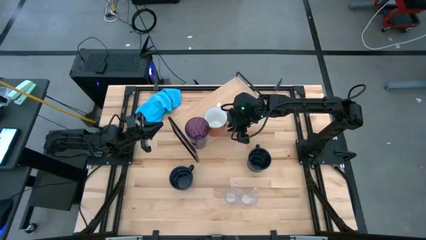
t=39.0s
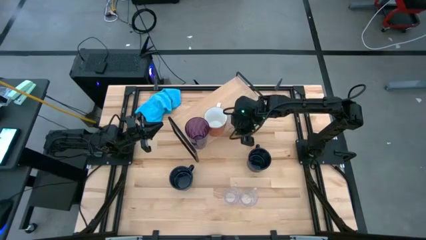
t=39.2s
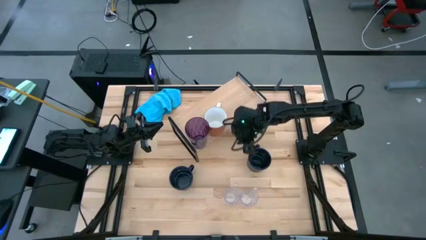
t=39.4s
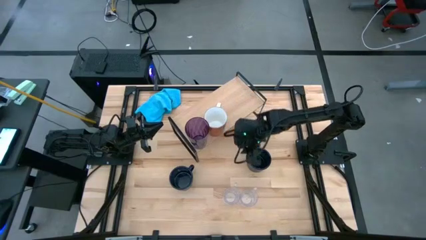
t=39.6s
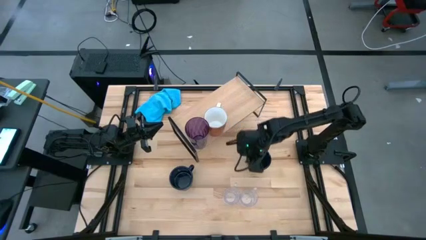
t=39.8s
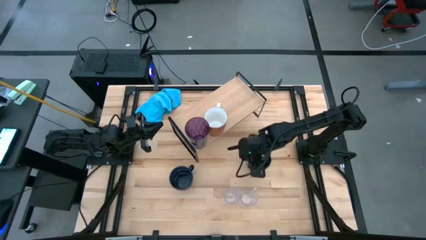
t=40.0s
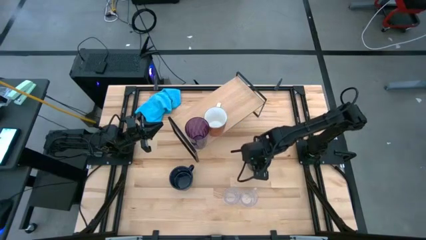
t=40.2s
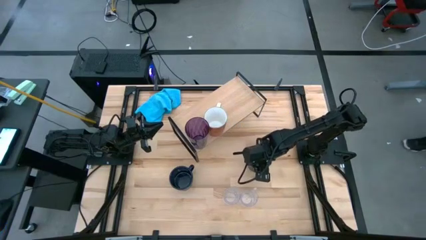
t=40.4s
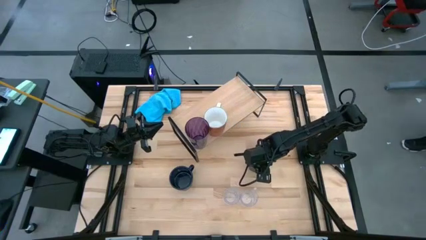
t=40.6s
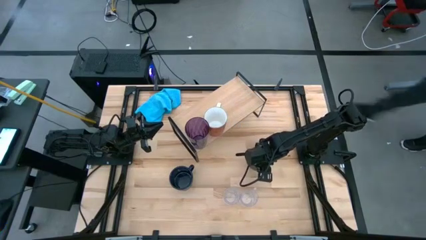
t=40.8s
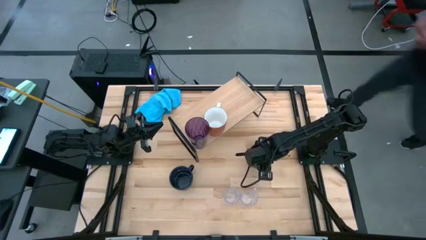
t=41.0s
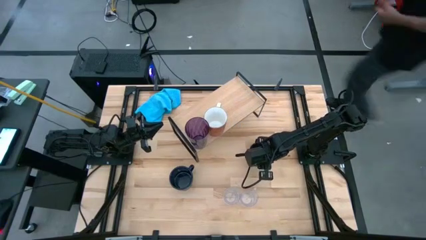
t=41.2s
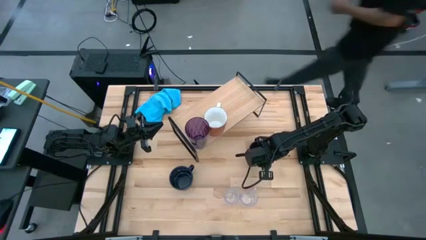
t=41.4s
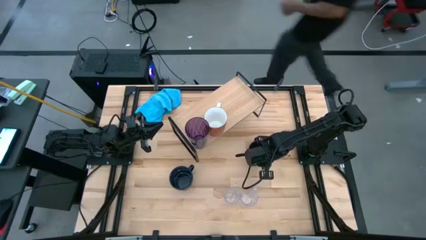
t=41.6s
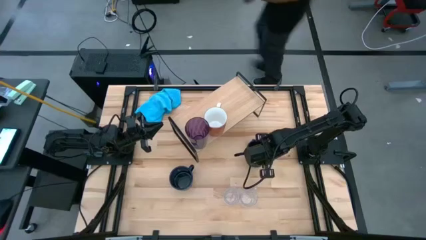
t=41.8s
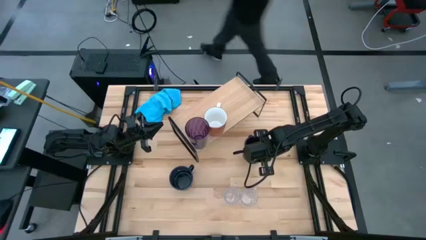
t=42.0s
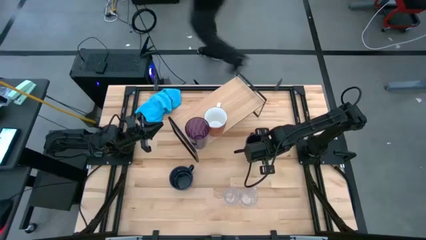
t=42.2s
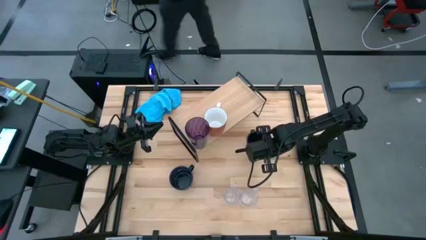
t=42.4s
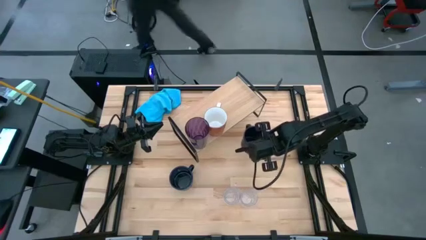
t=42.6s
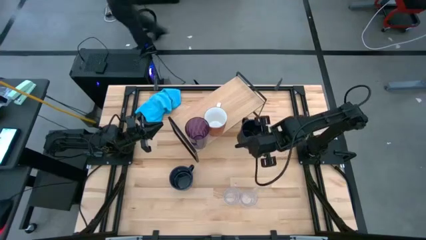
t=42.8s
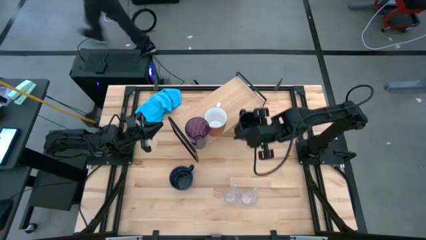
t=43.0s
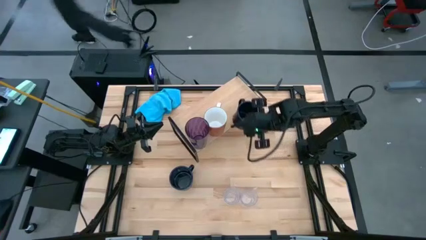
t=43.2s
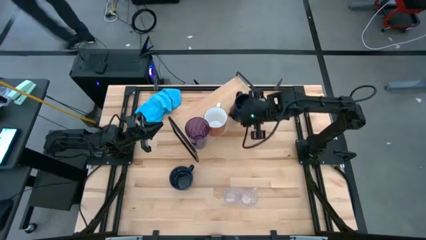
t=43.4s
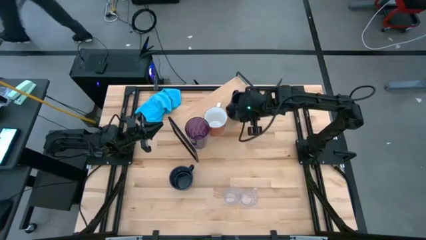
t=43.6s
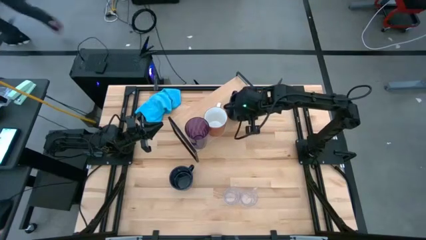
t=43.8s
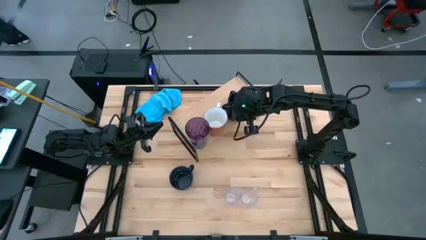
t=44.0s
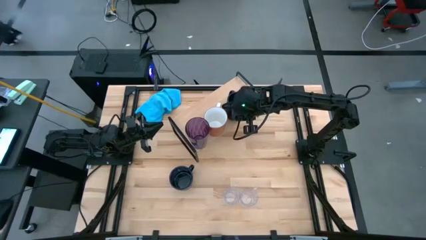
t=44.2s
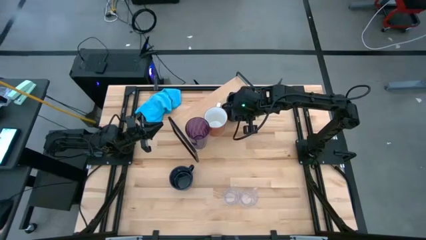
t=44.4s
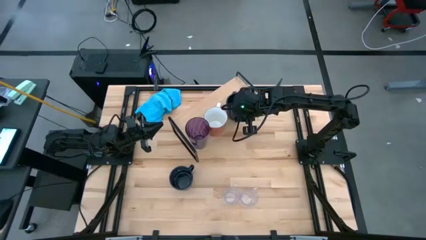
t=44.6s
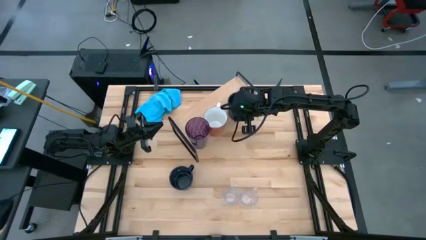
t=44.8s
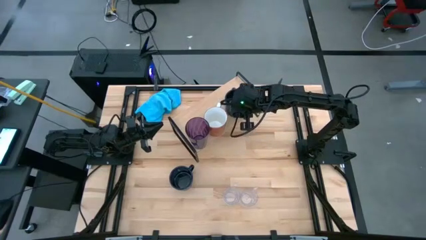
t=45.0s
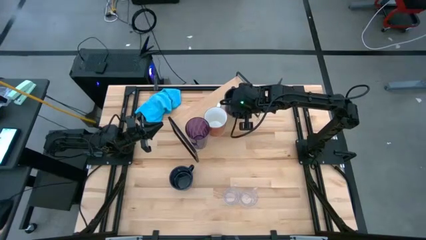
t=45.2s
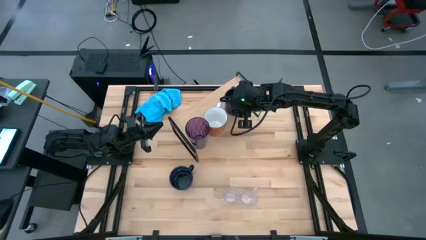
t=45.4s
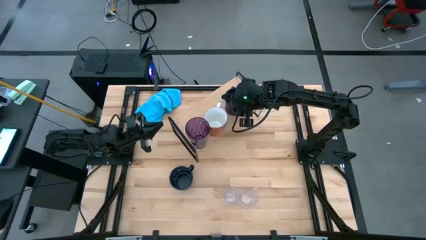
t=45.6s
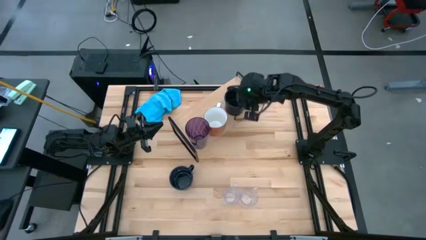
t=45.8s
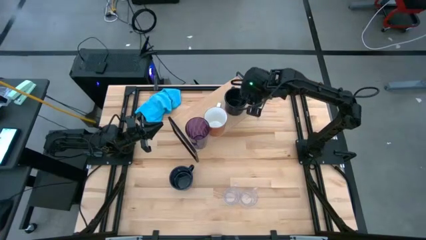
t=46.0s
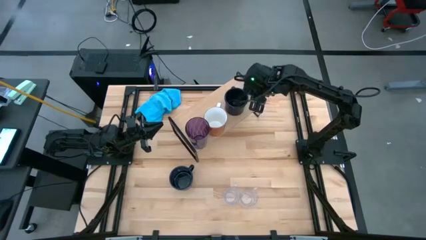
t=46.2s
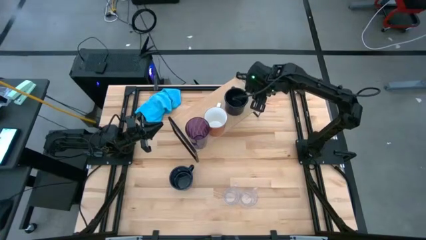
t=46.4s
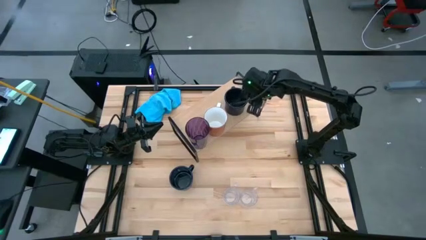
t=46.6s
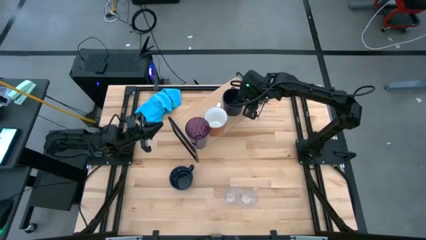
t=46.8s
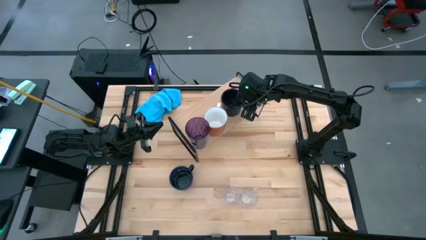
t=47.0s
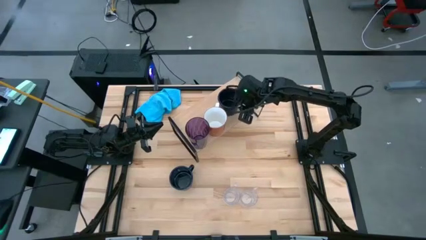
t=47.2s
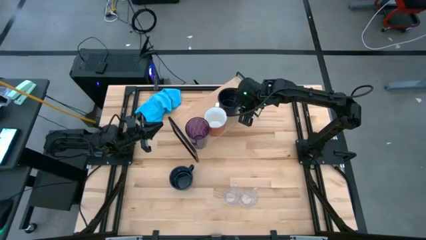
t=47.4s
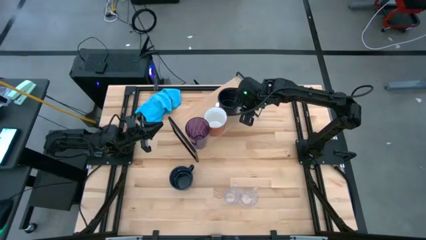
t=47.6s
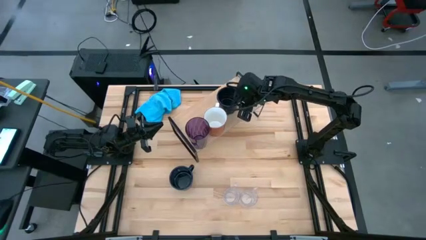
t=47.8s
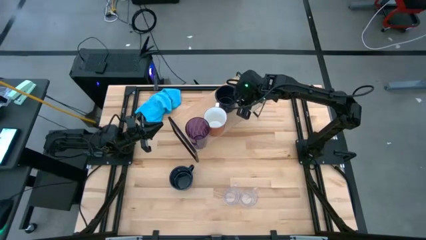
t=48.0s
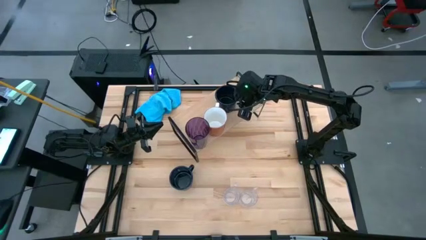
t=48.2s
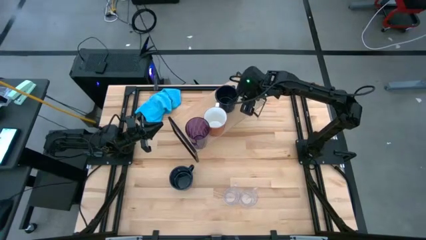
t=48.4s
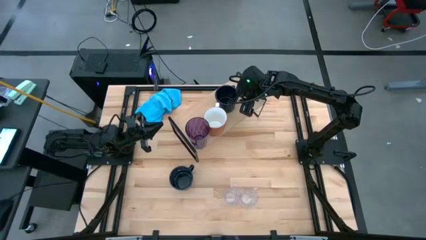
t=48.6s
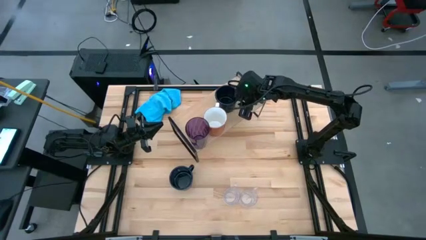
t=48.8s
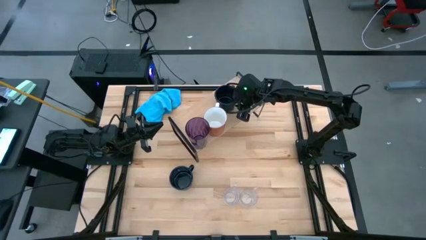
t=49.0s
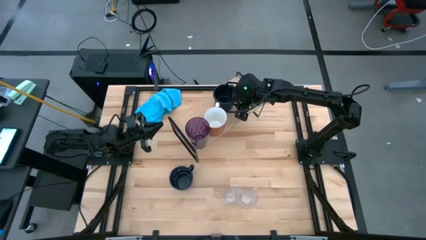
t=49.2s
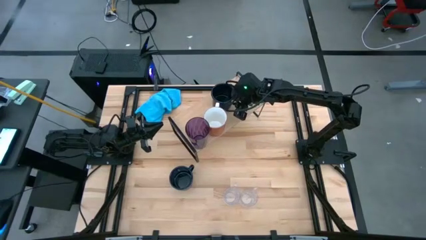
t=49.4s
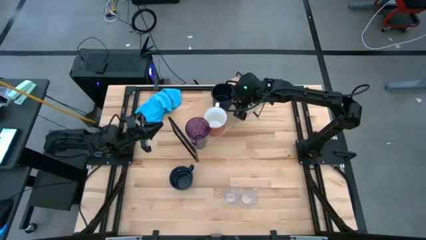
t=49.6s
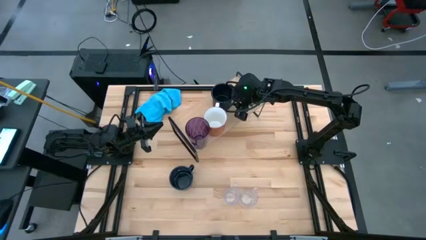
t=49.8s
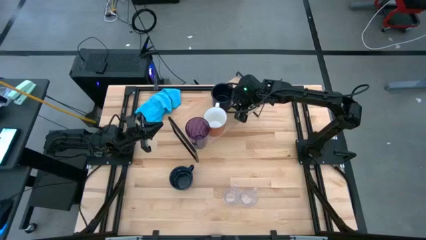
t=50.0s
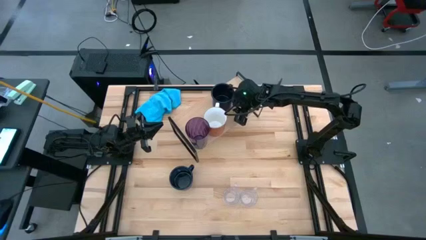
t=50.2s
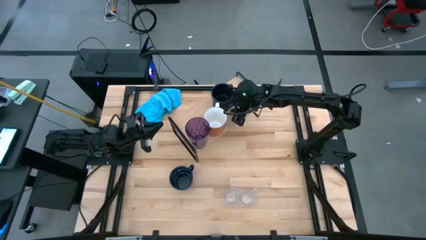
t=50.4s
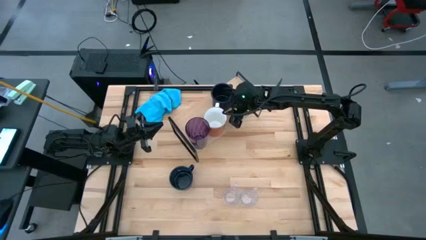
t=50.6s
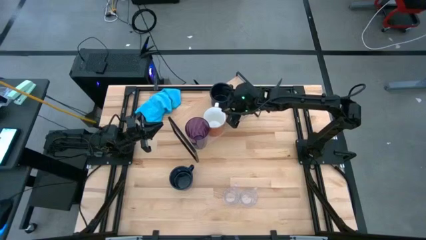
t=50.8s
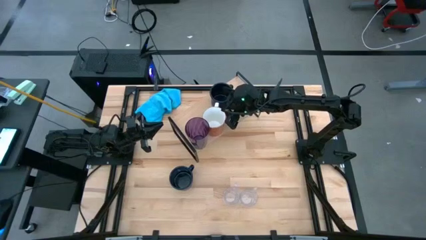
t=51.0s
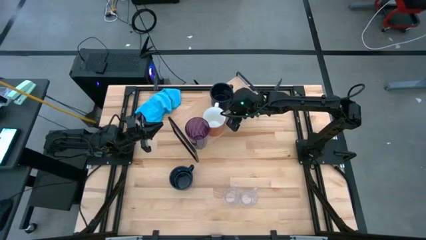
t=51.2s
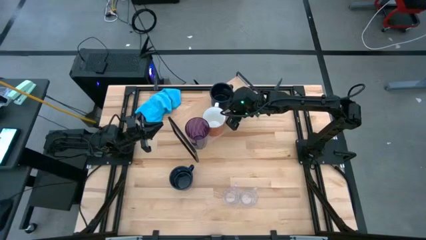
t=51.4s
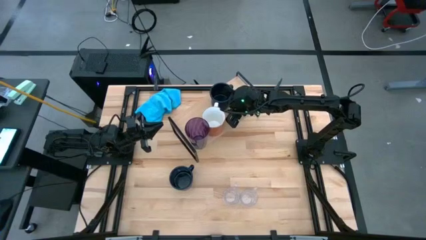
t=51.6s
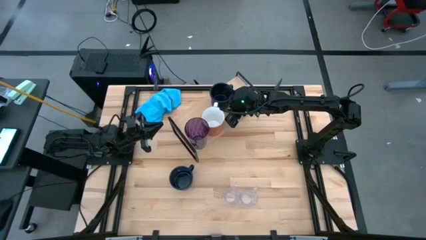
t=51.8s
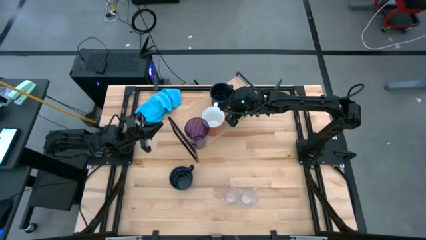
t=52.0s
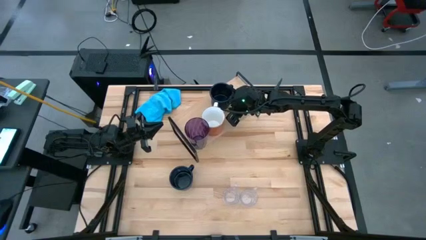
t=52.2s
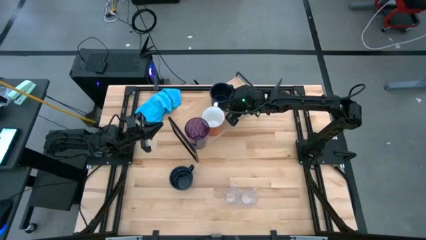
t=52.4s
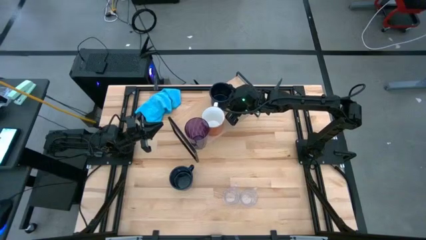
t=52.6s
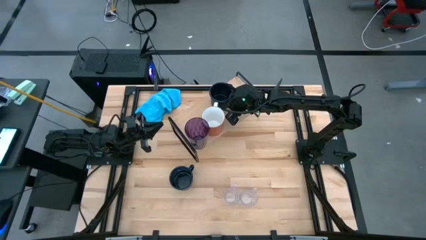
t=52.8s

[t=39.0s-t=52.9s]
Task: Stack small to large cups/mugs on shelf
Put the right dark blue mug on the shelf

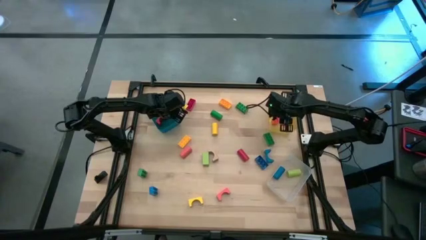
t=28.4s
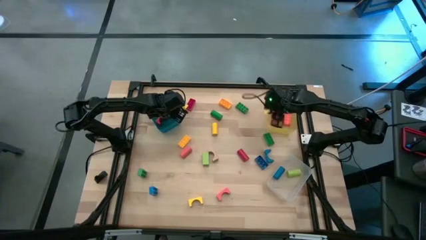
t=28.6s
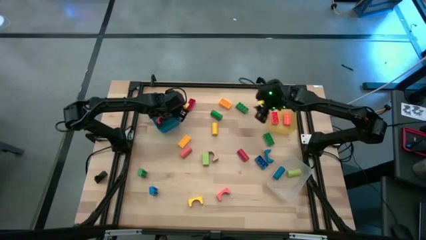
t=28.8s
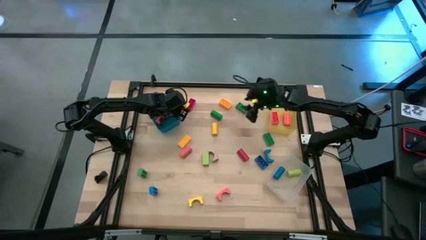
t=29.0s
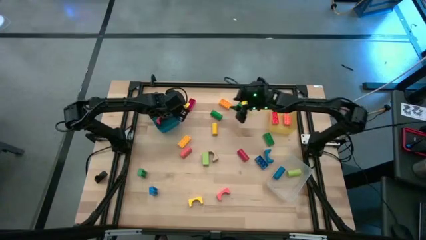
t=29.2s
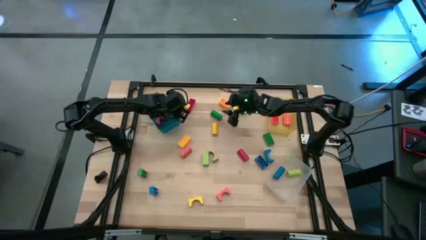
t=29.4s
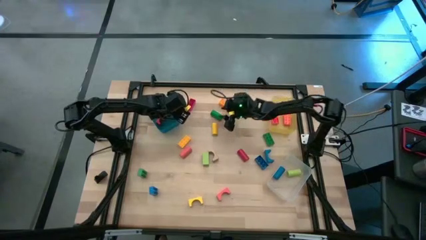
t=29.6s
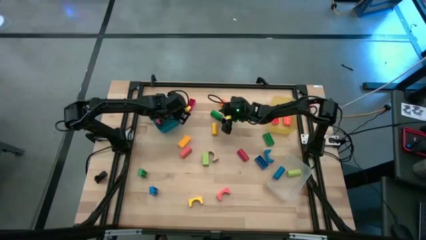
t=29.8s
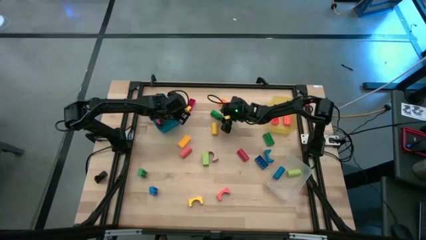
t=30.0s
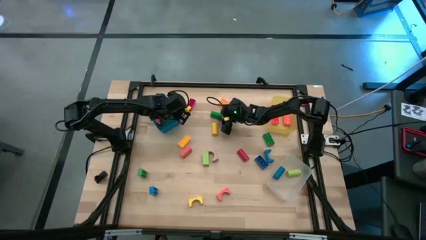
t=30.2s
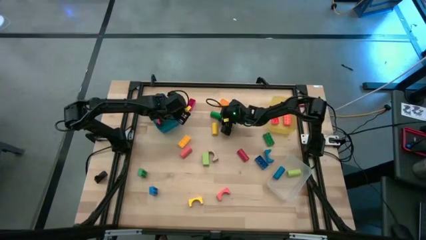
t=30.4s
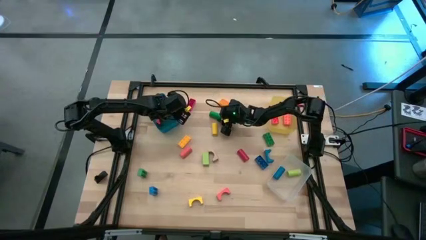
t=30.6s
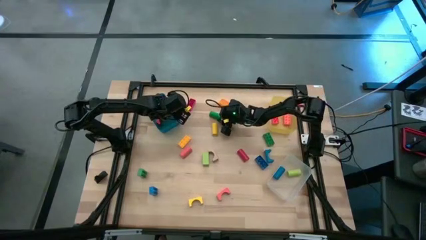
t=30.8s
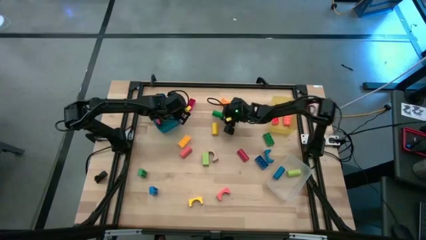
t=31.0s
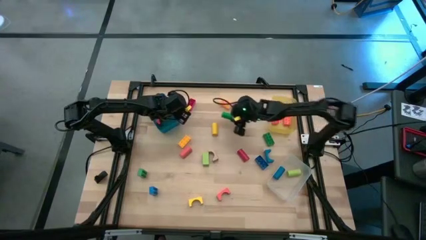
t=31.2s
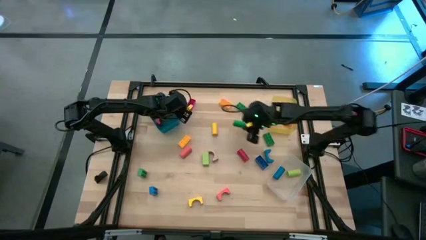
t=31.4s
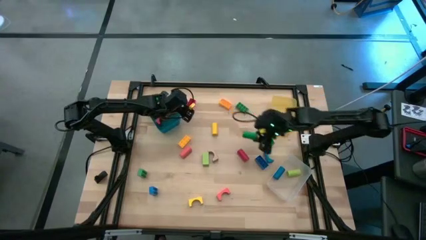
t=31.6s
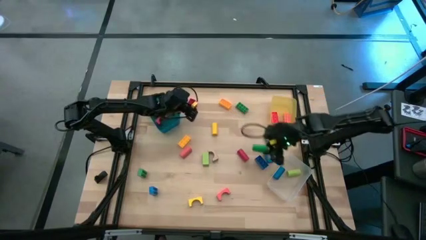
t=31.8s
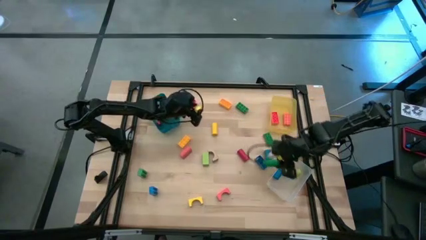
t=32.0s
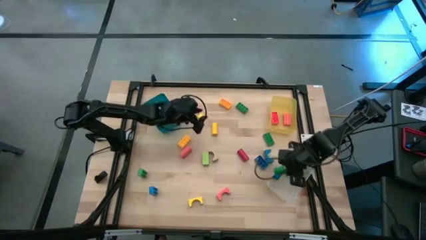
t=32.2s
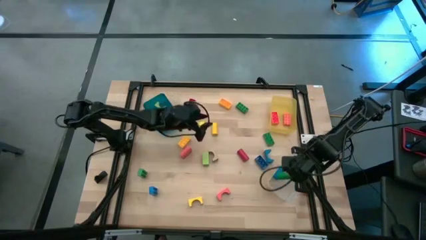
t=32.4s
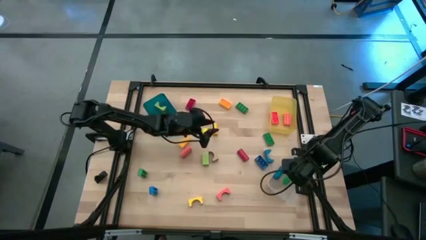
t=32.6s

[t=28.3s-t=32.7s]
Task: Sort blocks by size
Put the green cylindrical block into the transparent bin
